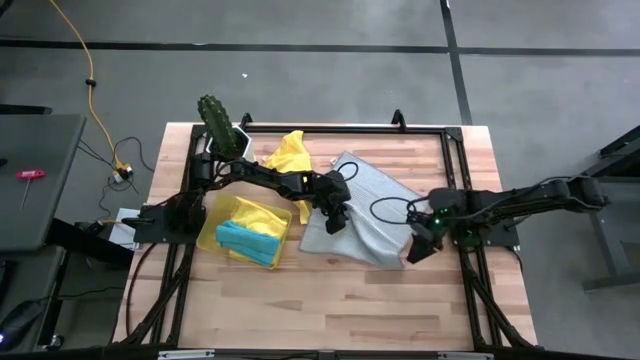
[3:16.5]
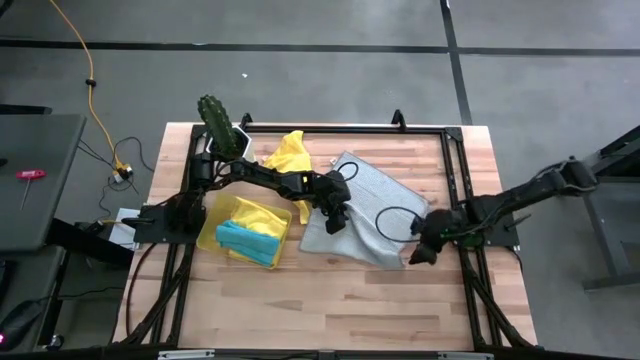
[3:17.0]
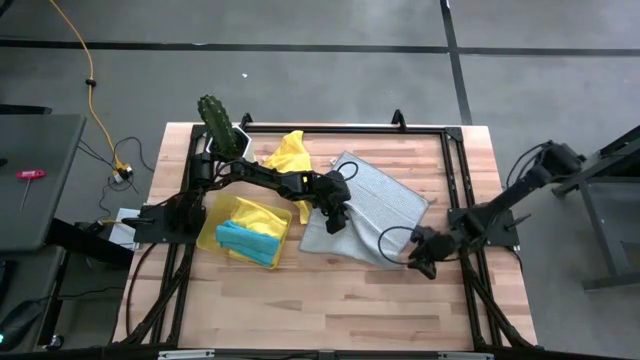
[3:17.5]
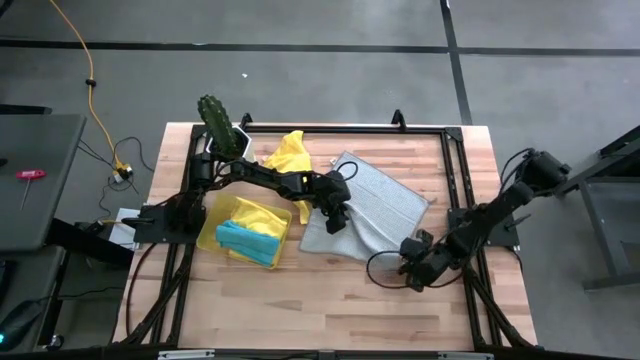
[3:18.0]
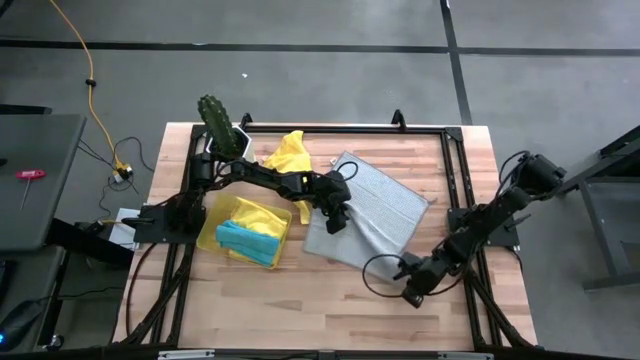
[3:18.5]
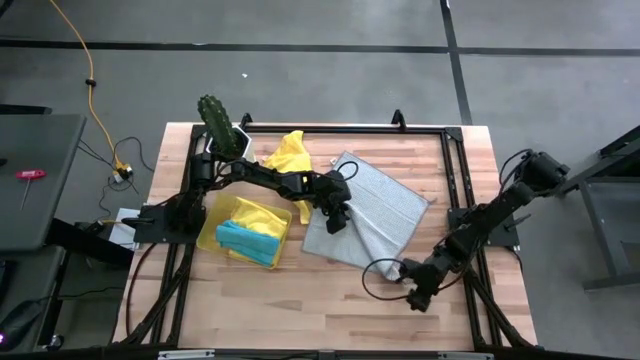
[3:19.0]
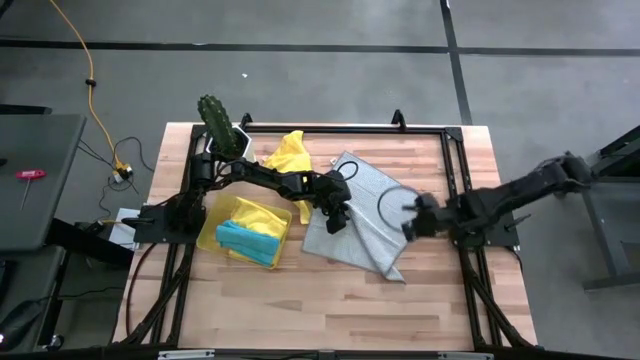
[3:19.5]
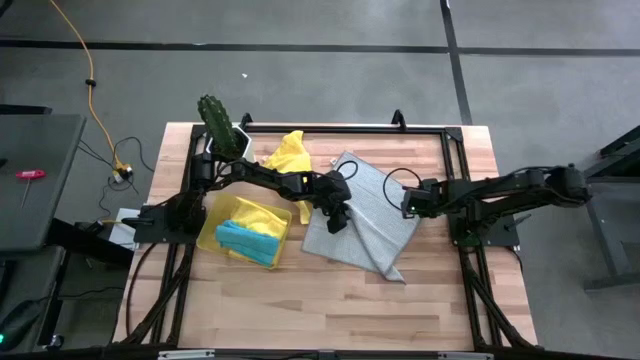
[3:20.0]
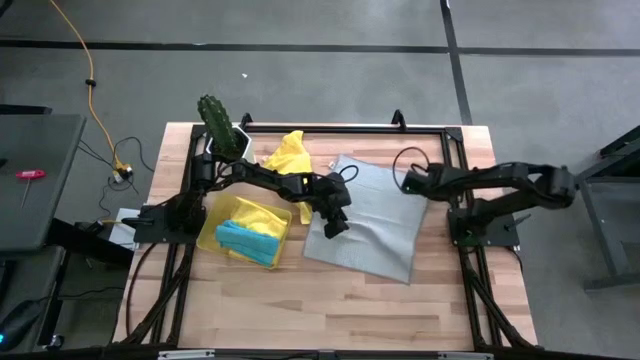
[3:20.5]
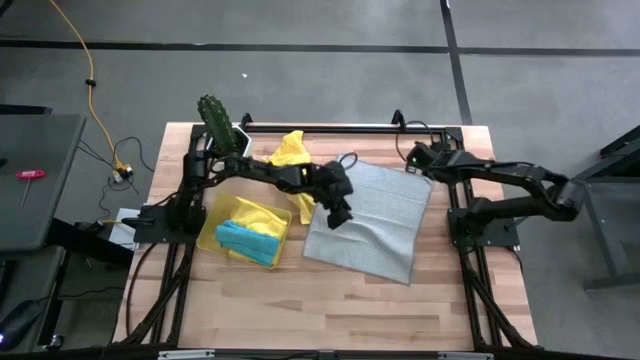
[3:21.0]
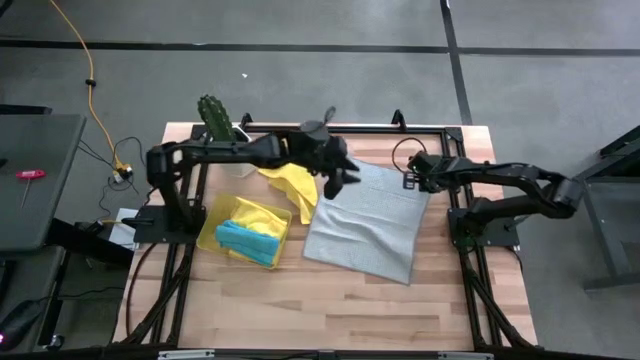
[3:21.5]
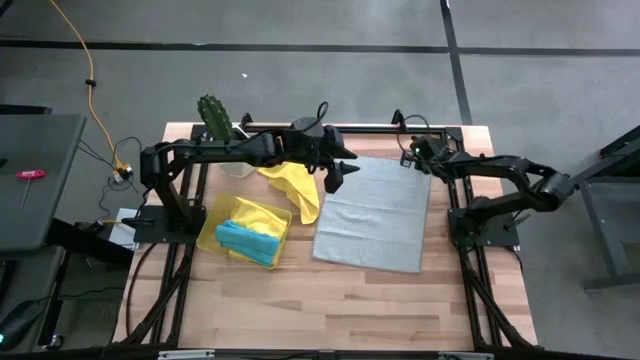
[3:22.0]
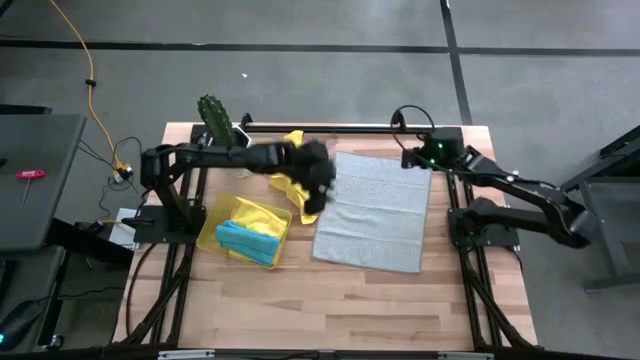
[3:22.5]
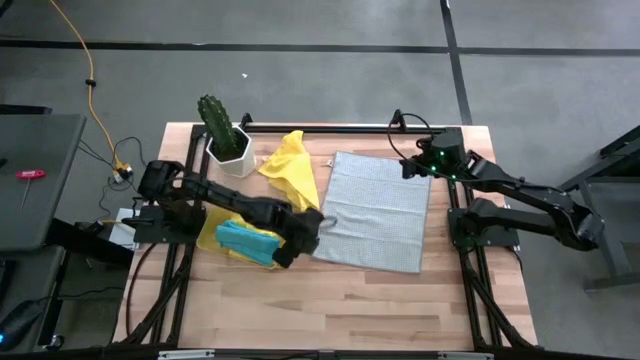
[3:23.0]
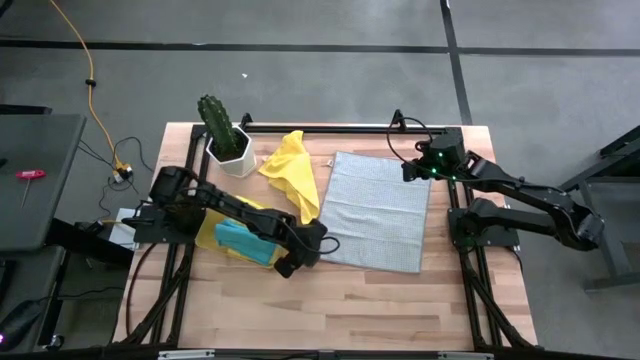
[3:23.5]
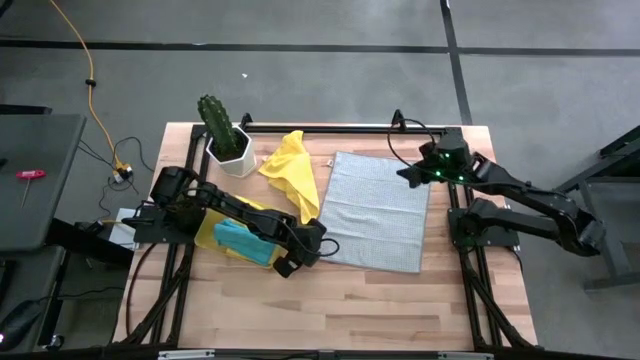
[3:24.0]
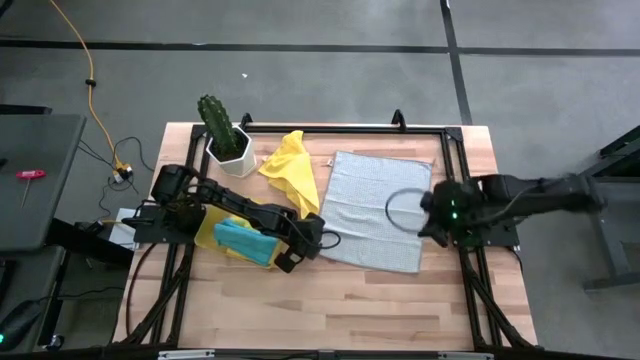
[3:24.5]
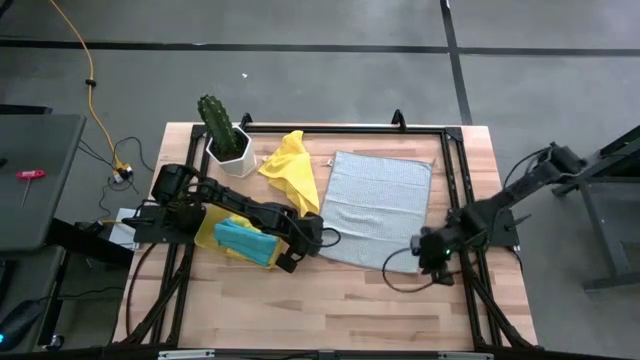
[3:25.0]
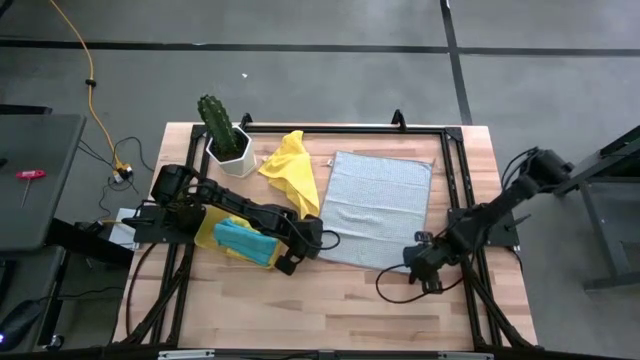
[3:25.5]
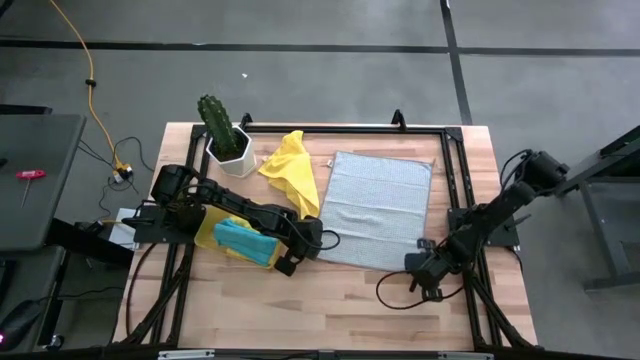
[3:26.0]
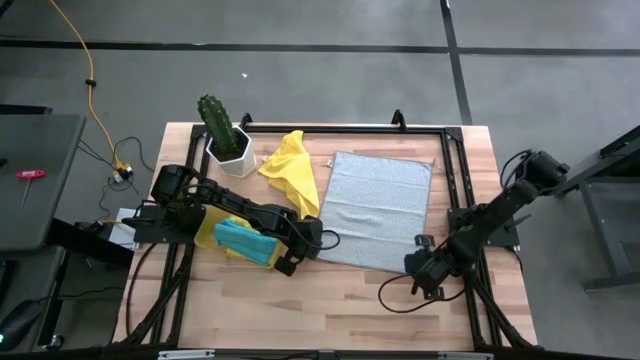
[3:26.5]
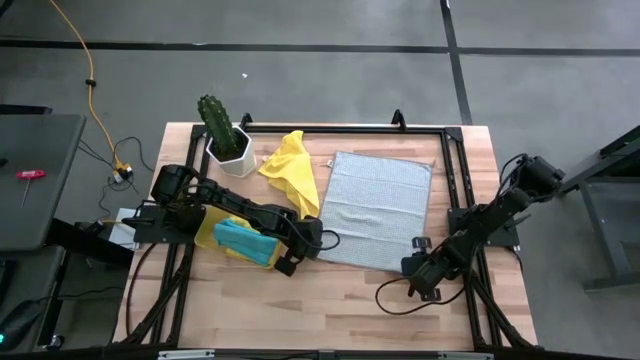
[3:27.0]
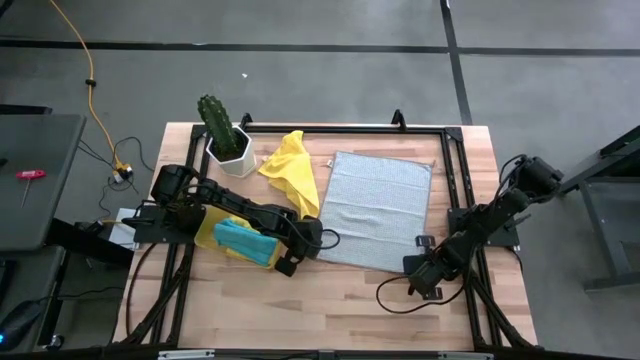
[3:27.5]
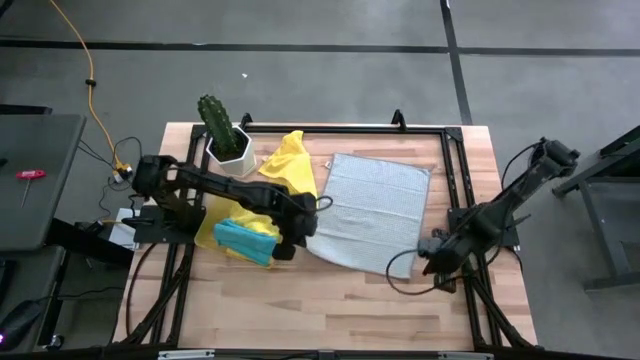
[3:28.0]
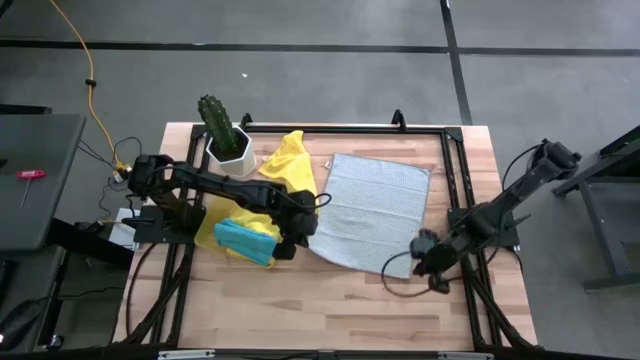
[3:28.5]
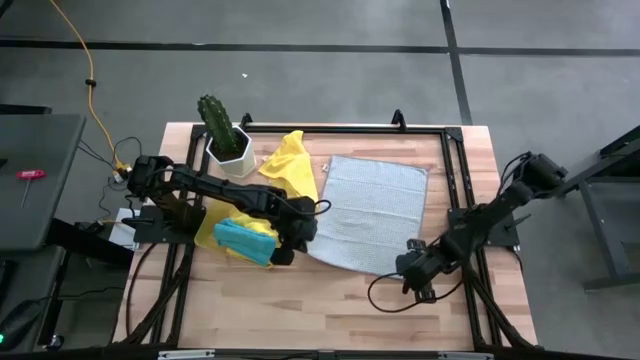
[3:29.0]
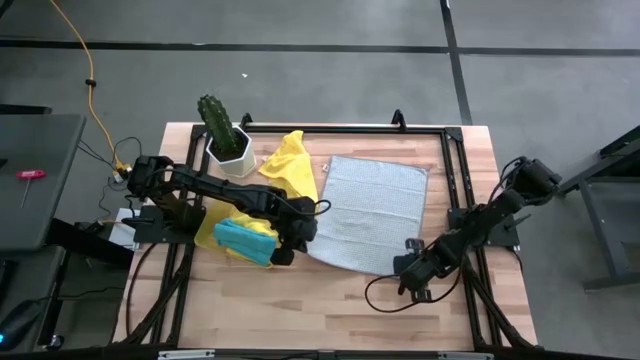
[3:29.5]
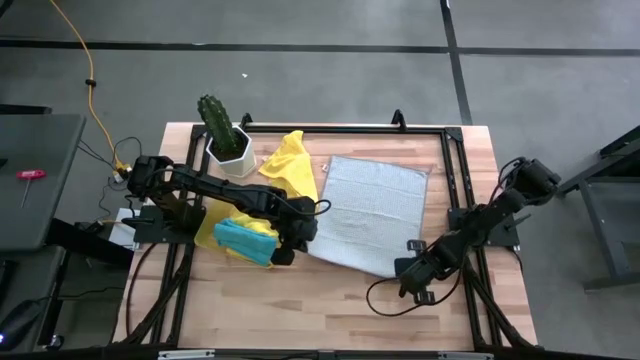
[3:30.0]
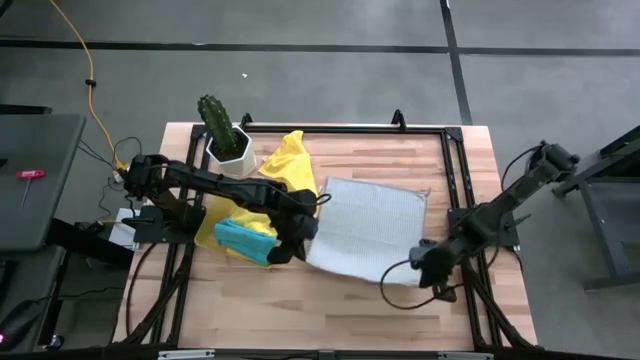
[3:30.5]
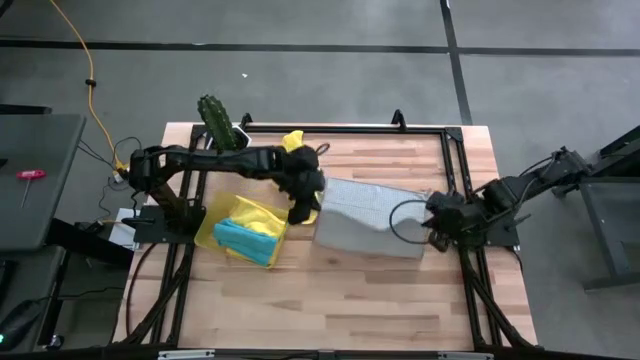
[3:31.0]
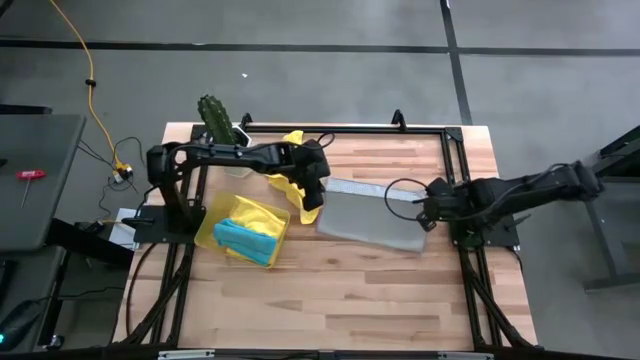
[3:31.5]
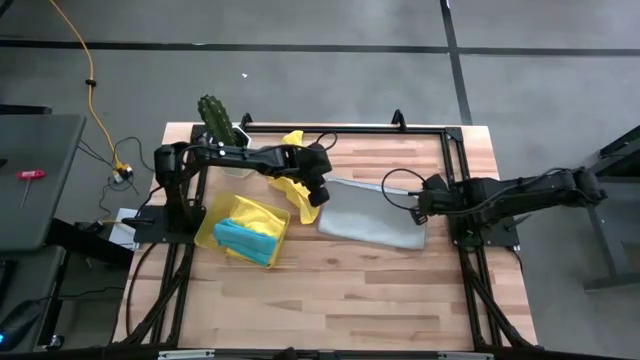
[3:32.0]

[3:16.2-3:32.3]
Task: Fold microfiber towels
Fold the gray microfiber towel

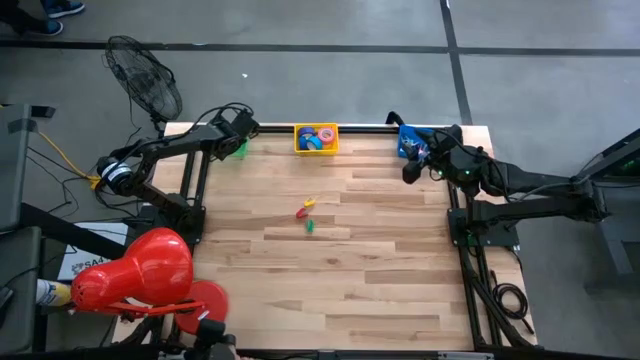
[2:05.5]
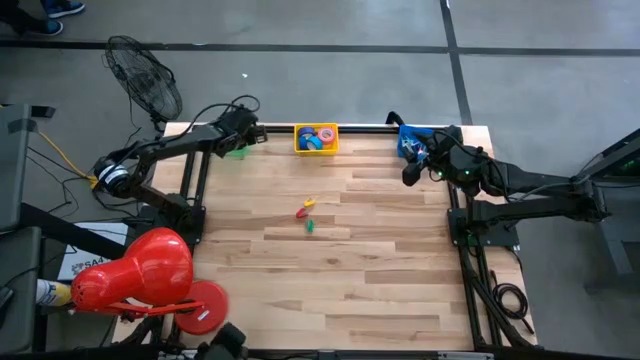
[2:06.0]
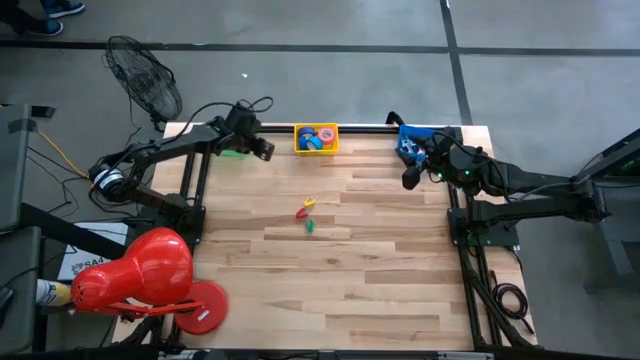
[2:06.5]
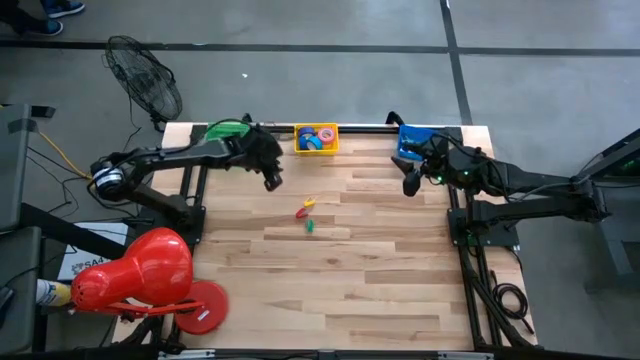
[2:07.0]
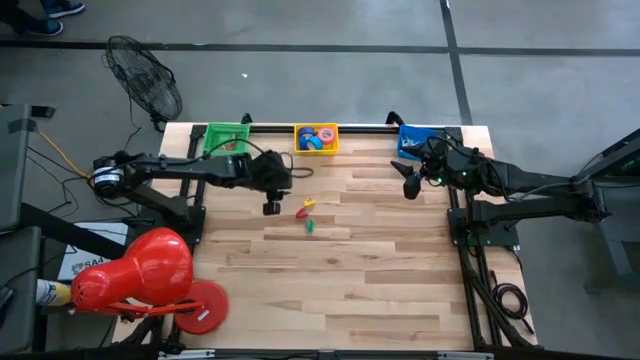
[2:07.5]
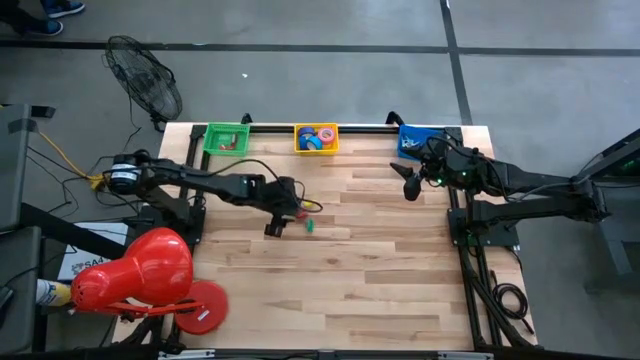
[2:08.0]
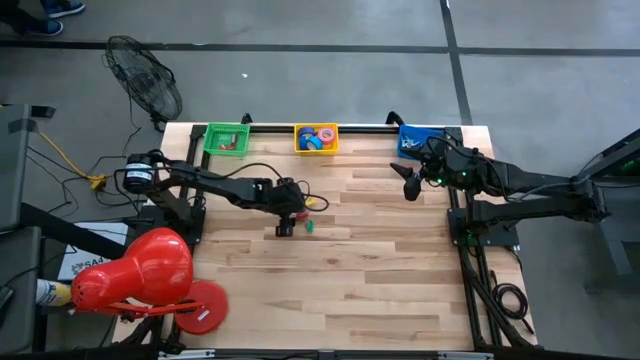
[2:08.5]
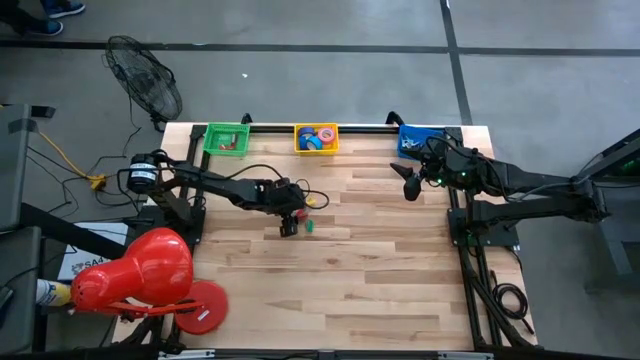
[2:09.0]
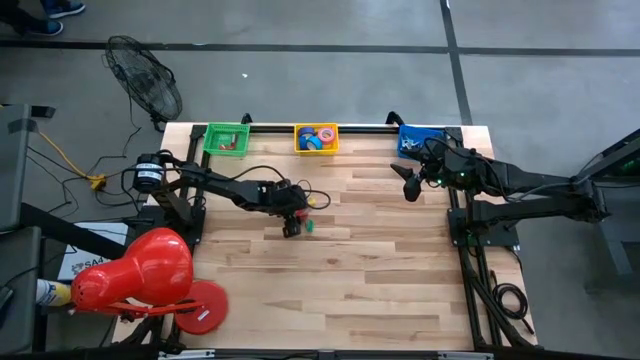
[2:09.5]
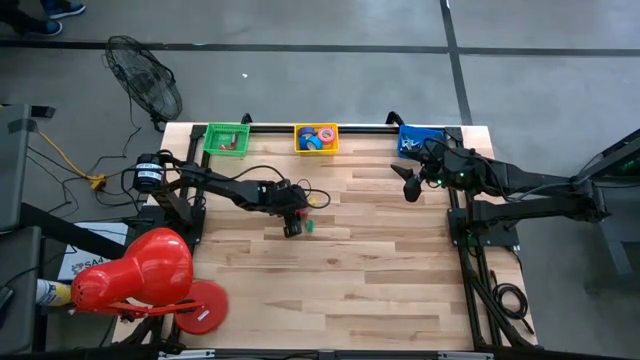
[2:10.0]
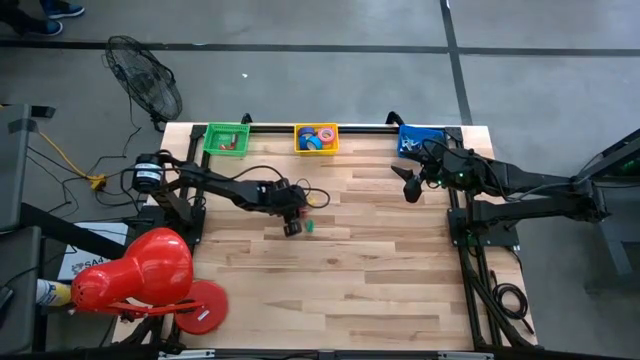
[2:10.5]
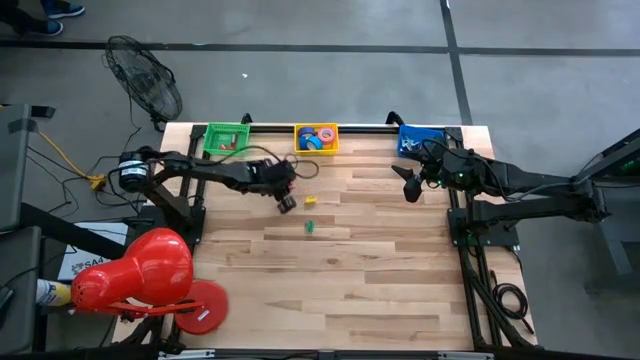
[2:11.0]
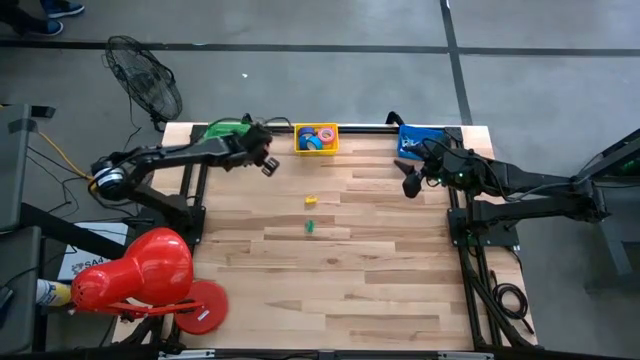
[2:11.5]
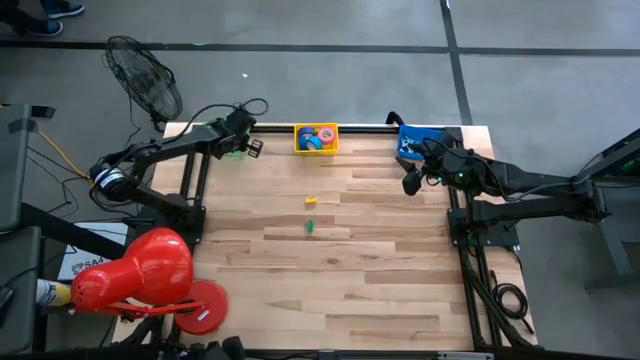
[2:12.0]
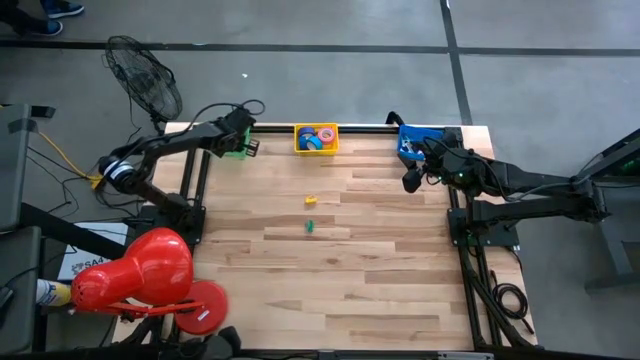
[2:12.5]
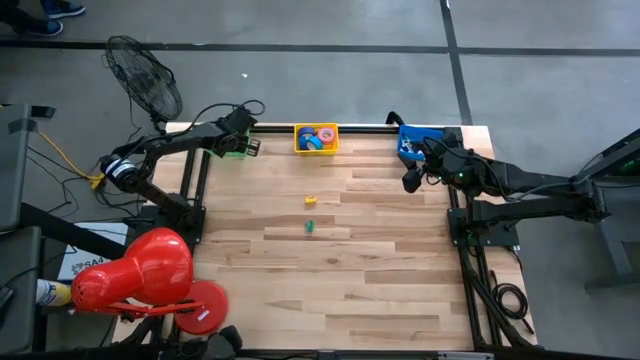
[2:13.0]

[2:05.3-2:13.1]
Task: Pick and place Stapler, Stapler remover, tape
Put the red stapler into the green bin
